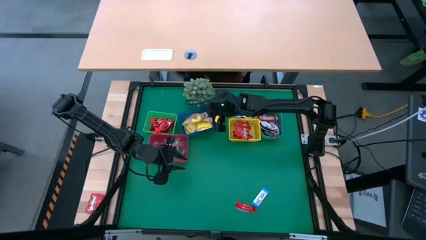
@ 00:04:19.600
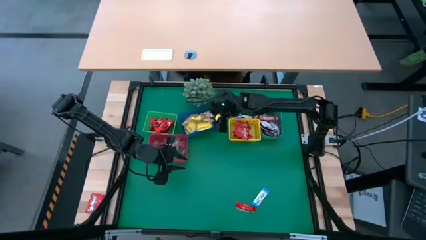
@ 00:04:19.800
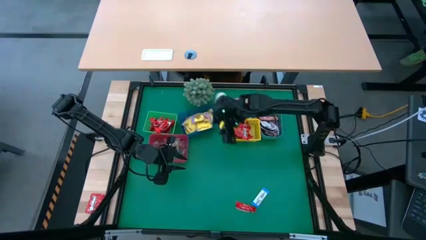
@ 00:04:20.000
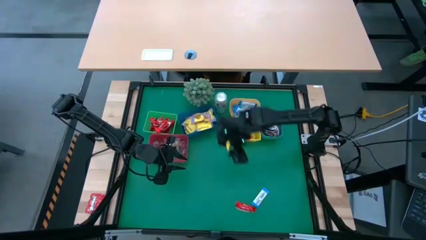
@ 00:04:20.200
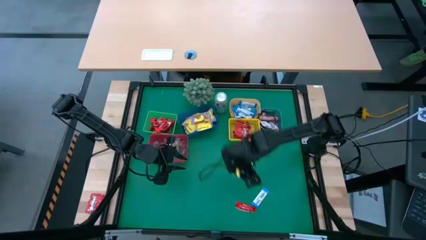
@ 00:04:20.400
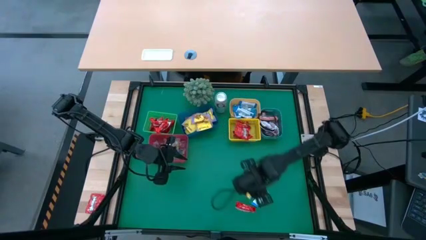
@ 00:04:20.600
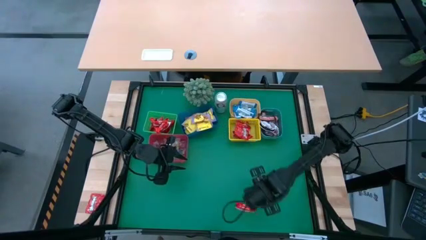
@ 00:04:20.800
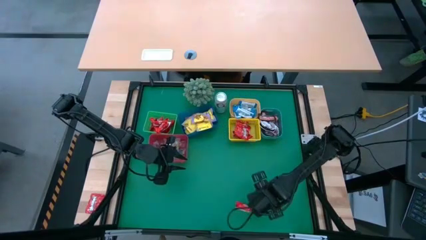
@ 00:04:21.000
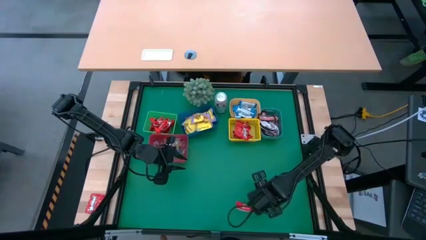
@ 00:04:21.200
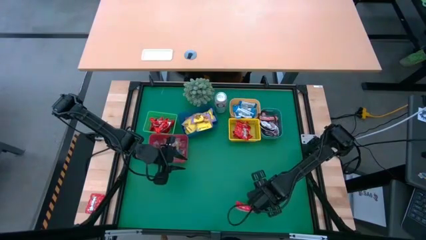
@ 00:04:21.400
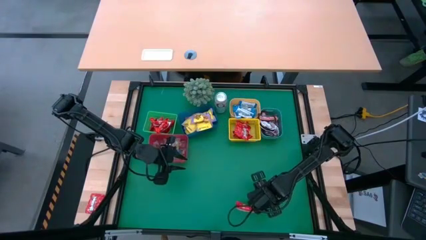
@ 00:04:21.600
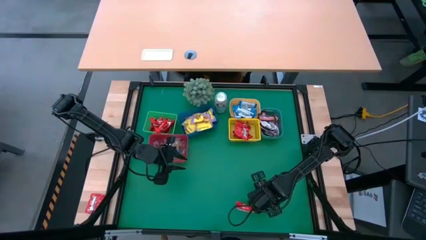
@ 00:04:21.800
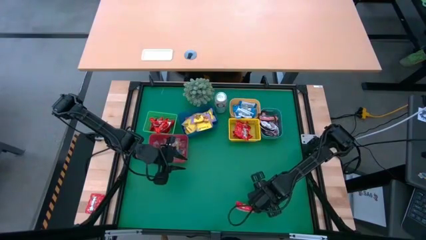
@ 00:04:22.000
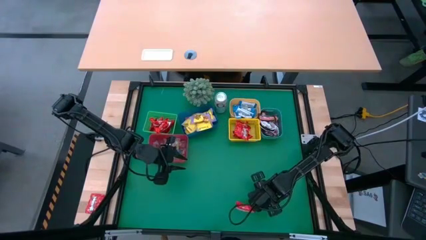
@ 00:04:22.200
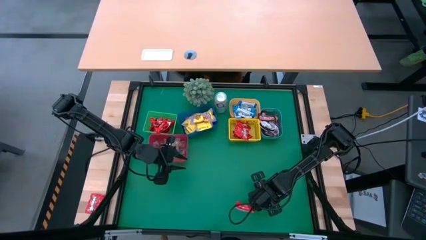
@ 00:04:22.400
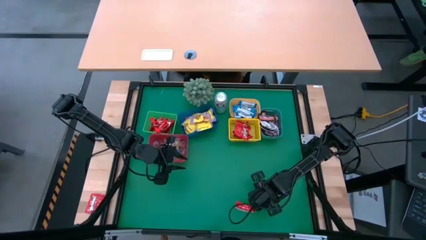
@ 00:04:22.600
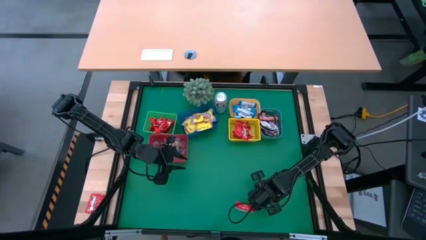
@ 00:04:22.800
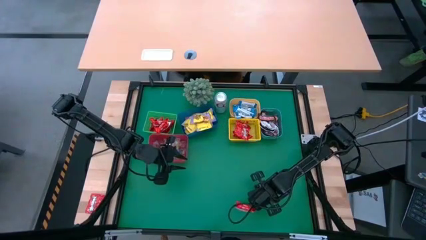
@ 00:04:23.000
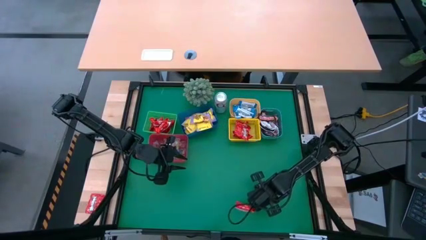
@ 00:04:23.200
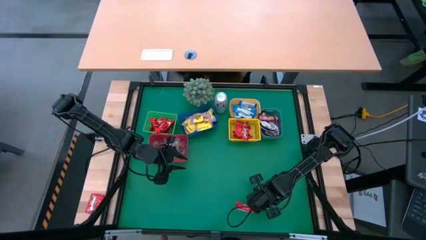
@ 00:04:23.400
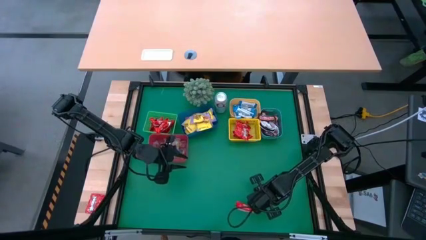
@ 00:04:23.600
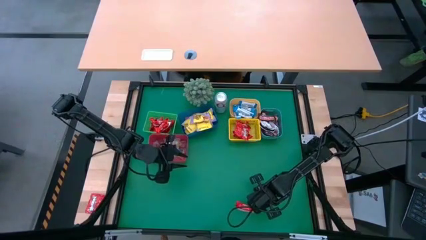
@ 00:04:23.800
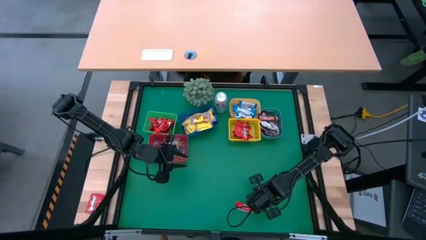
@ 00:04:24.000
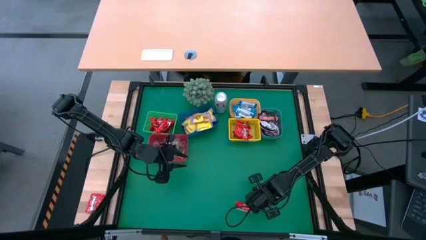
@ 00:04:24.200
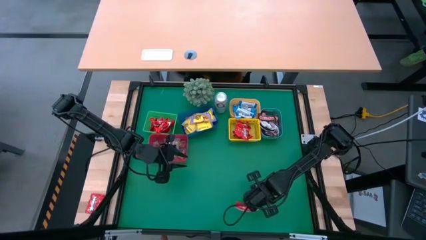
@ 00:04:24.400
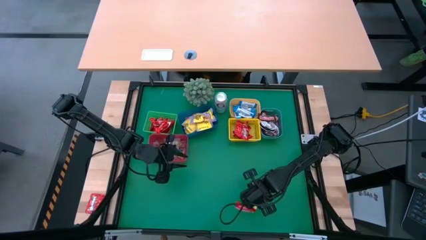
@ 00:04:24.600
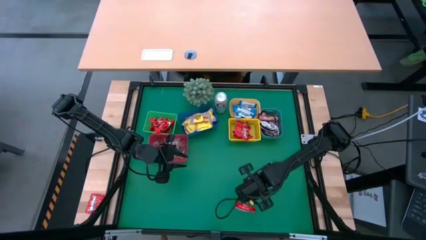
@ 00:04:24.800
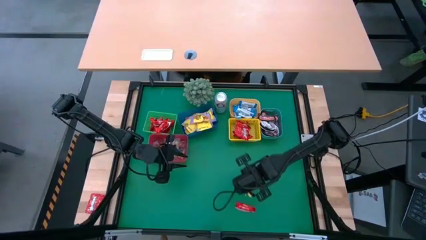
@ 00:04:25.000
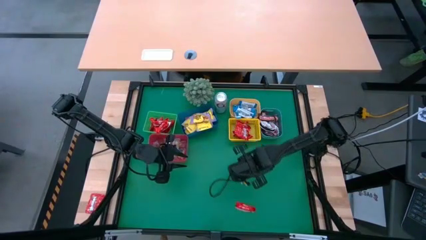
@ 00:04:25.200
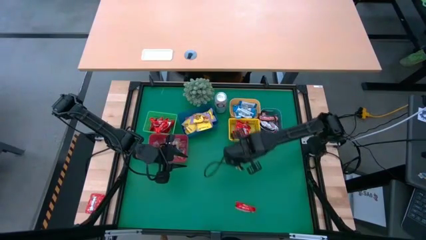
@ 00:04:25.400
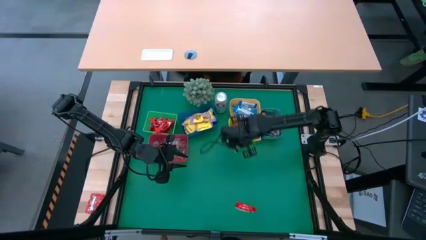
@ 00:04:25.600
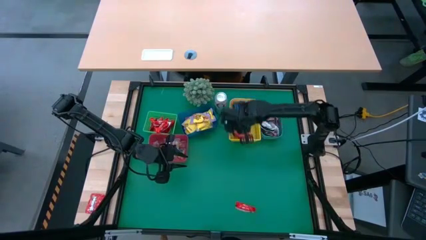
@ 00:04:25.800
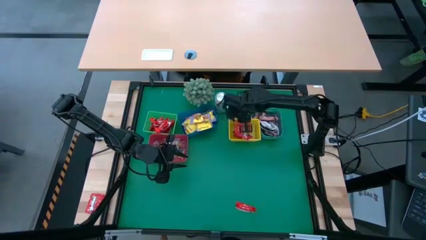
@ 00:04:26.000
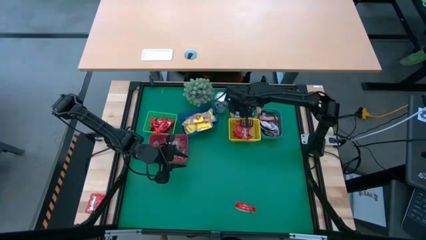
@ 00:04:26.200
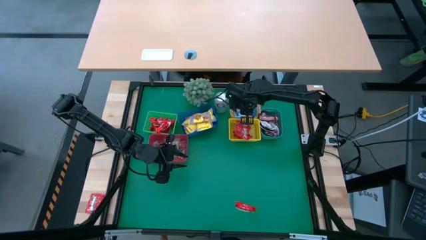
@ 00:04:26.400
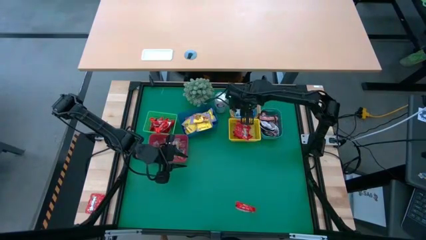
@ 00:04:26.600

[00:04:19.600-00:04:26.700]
Task: Sort candy
Put the blue chocolate bar into the orange bin

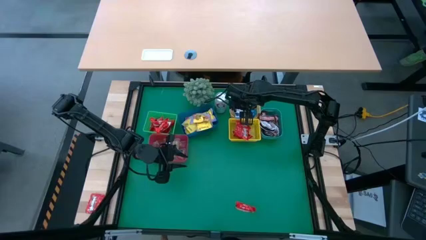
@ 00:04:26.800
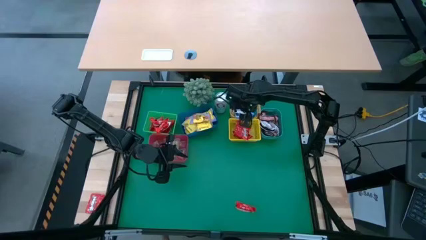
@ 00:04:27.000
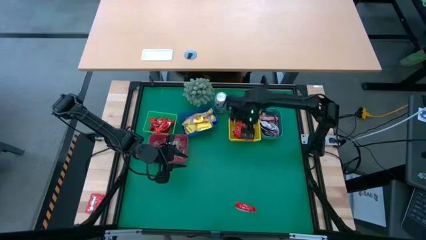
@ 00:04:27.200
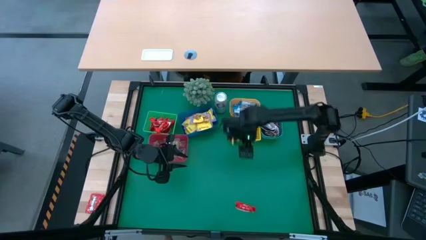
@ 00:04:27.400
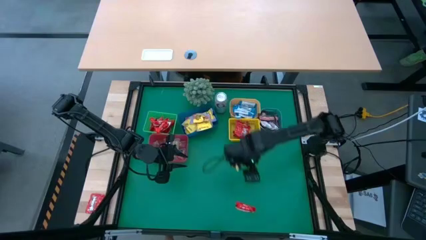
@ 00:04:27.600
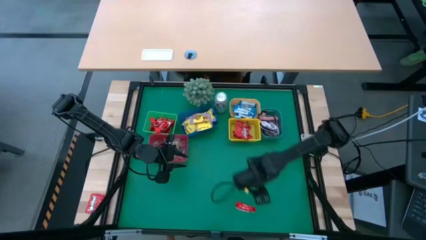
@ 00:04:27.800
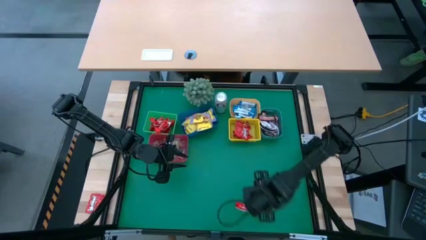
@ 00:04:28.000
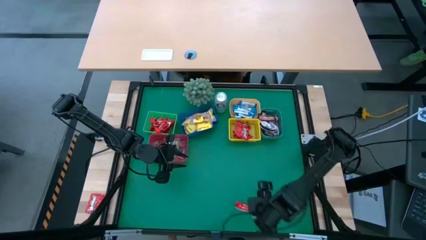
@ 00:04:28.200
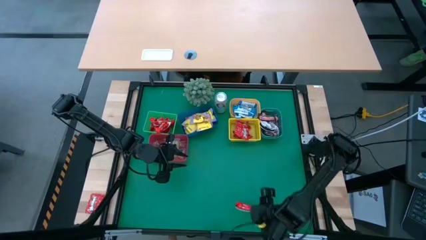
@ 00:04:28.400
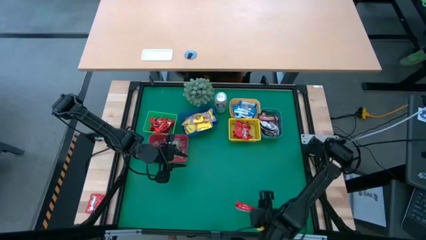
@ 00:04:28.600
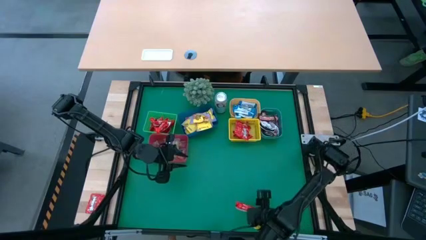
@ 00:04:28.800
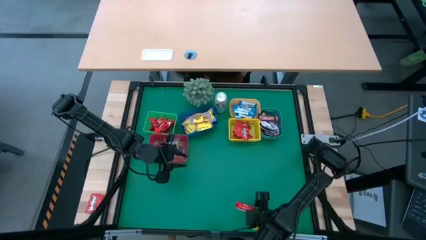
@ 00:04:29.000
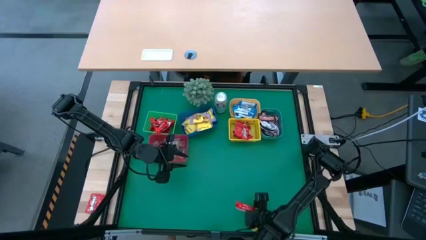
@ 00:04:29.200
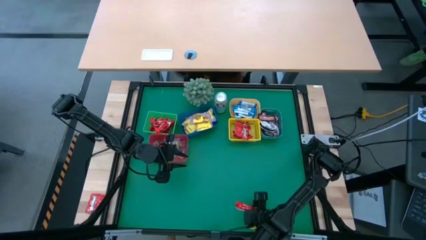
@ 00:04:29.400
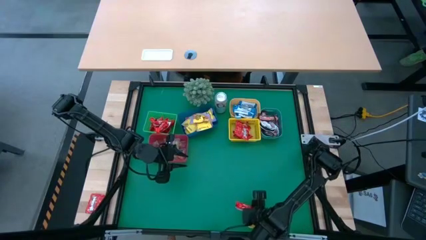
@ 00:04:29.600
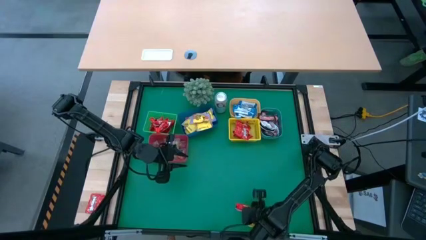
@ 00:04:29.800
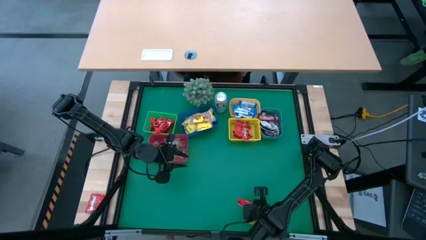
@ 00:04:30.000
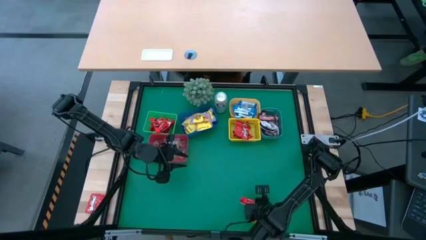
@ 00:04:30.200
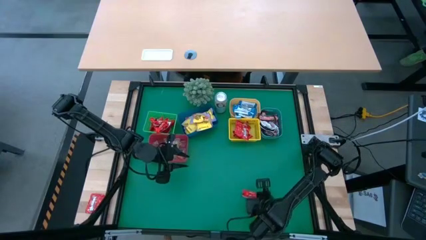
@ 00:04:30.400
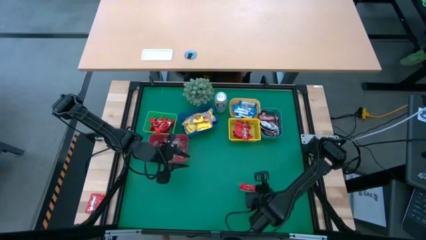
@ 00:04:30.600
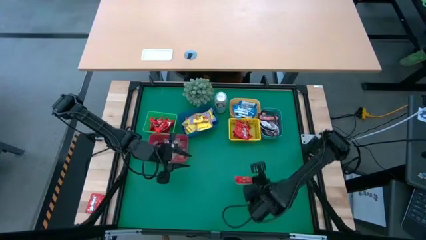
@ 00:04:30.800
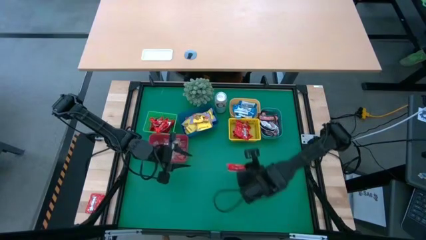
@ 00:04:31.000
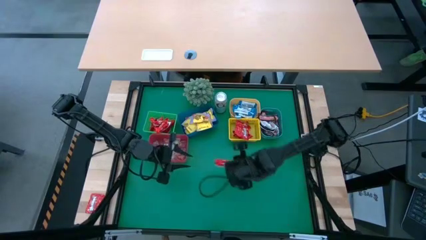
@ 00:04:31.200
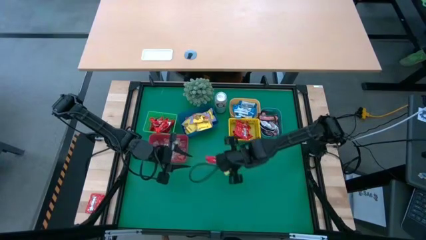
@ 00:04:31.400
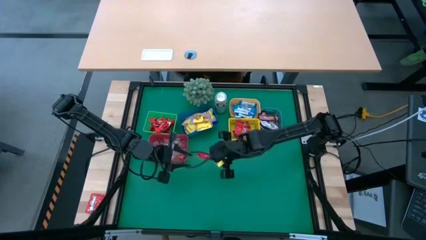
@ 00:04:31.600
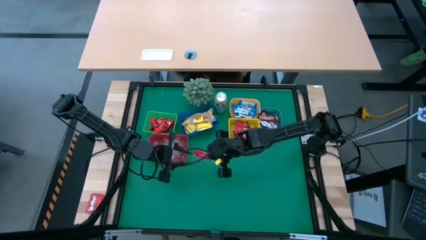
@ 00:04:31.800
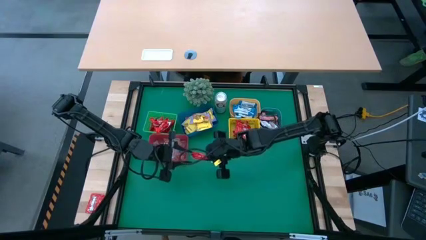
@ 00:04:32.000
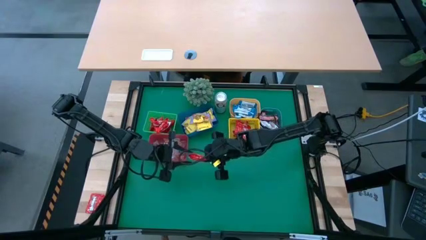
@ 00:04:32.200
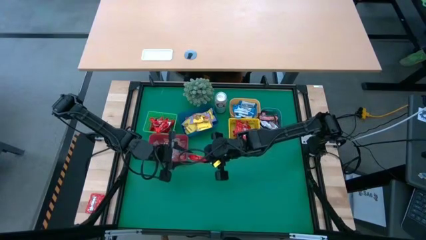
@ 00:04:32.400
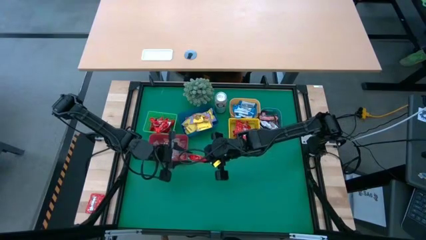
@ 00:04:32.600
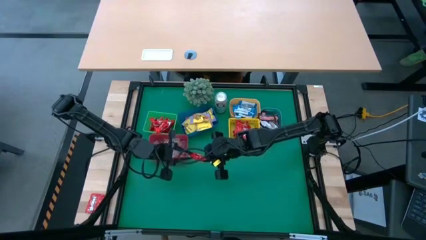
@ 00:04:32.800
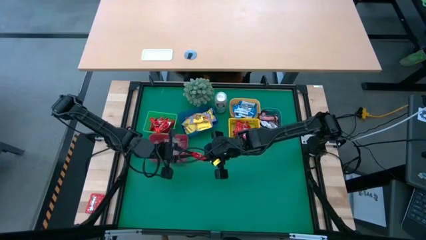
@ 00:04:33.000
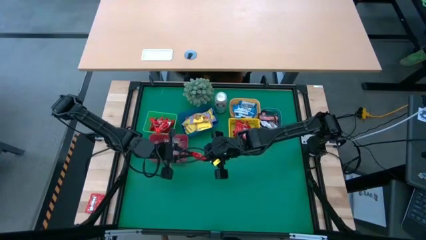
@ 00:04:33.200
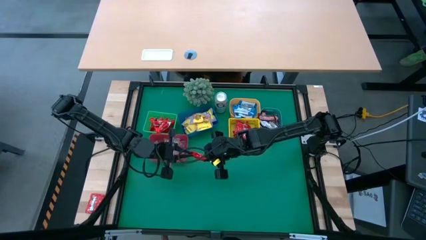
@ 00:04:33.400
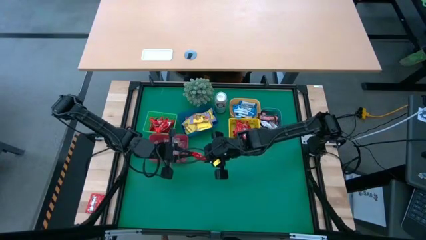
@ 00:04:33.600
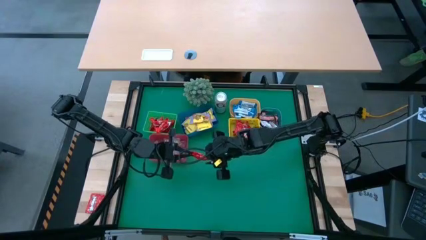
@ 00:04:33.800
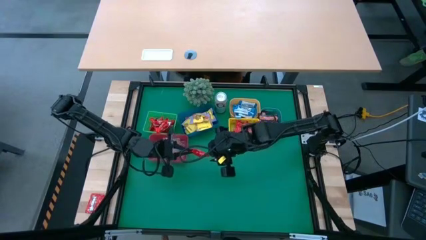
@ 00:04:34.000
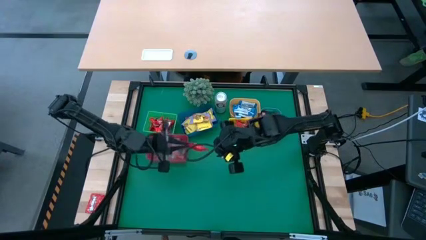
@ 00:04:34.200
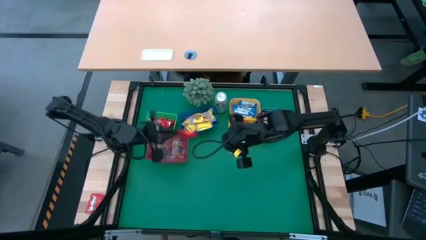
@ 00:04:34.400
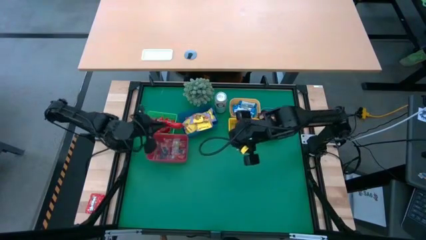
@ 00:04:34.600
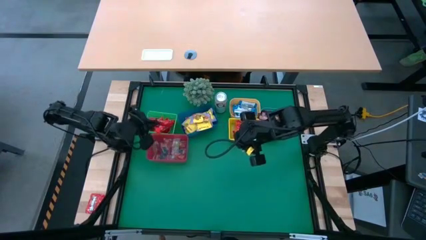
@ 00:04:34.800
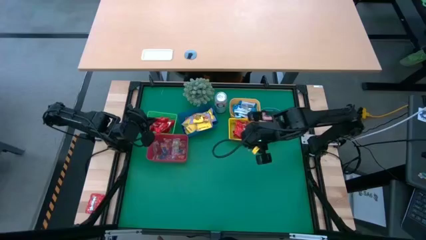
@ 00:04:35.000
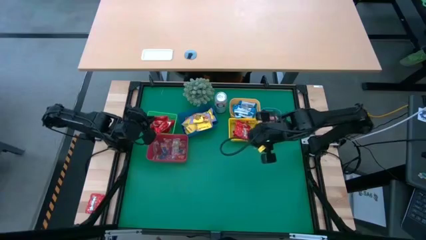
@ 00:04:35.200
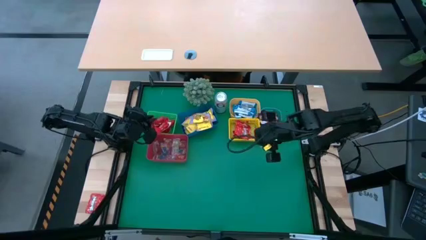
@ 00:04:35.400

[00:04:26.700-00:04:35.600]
Put the red chocolate bar into the green bin
